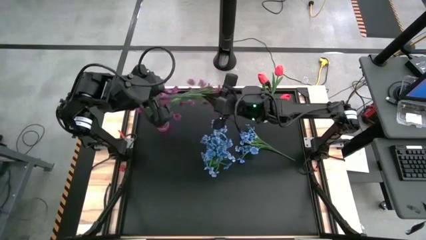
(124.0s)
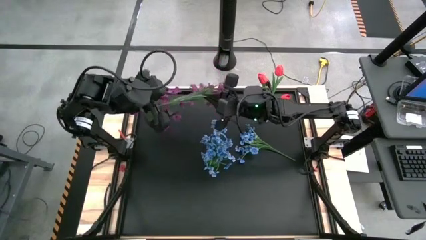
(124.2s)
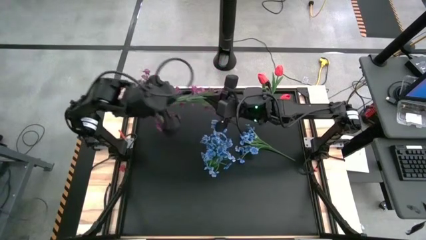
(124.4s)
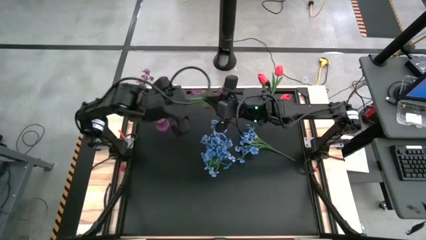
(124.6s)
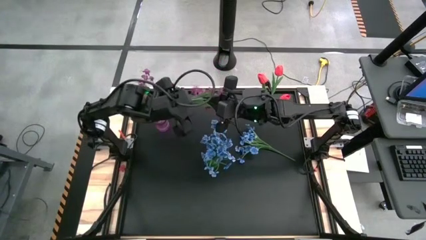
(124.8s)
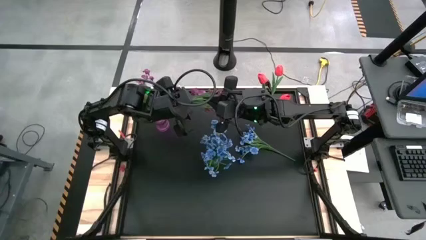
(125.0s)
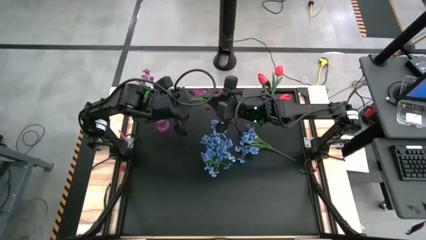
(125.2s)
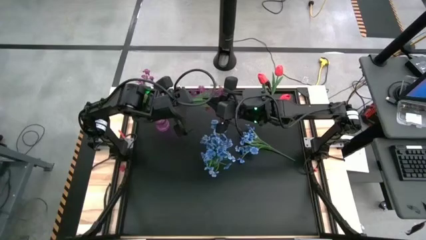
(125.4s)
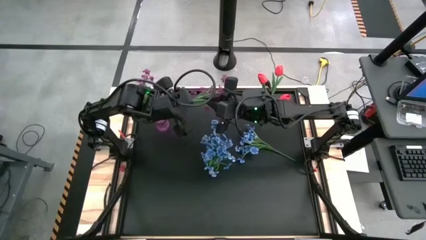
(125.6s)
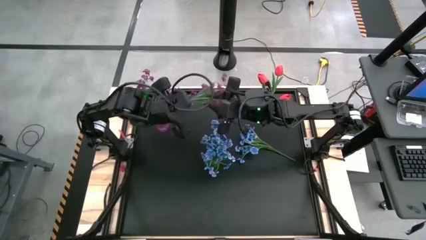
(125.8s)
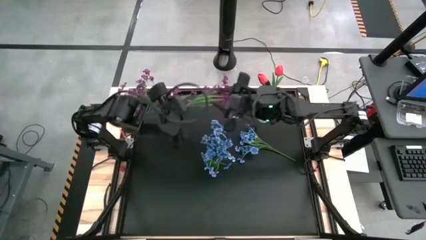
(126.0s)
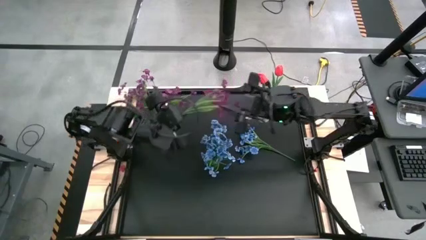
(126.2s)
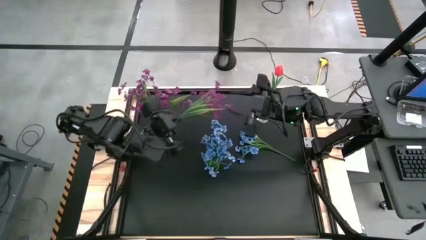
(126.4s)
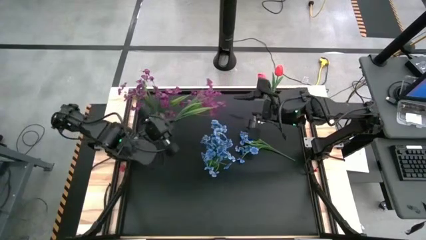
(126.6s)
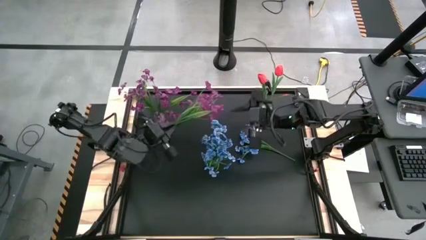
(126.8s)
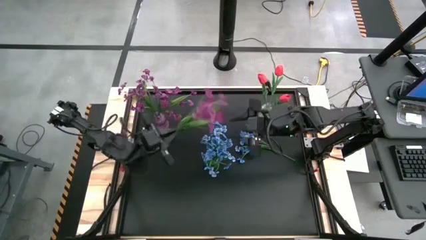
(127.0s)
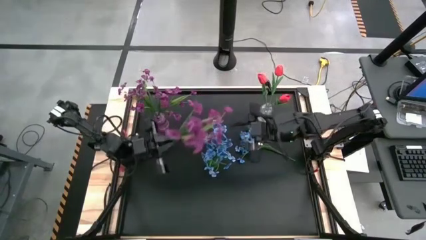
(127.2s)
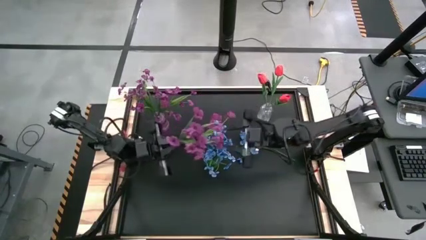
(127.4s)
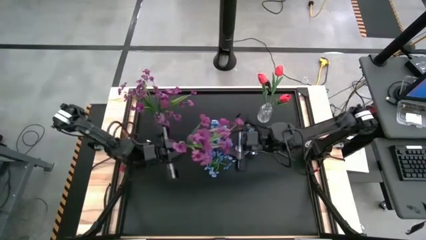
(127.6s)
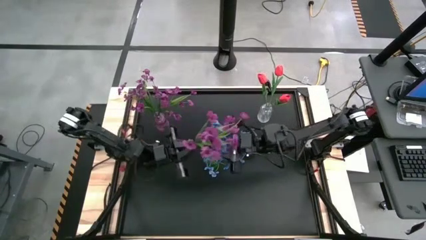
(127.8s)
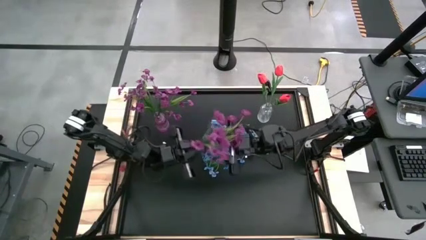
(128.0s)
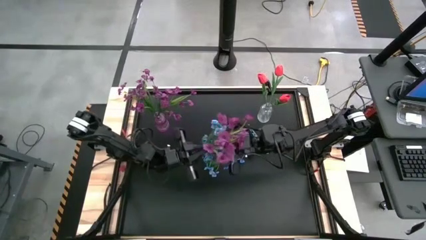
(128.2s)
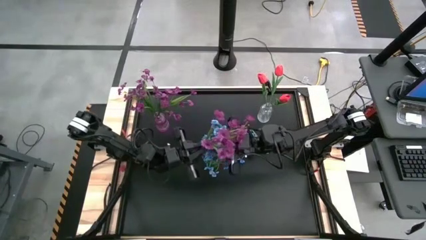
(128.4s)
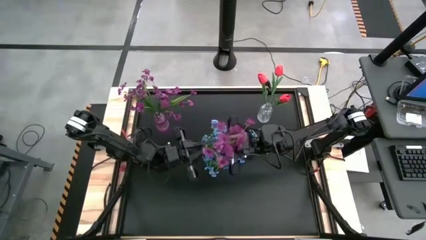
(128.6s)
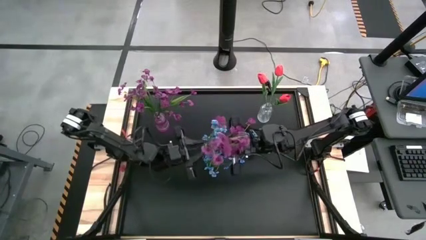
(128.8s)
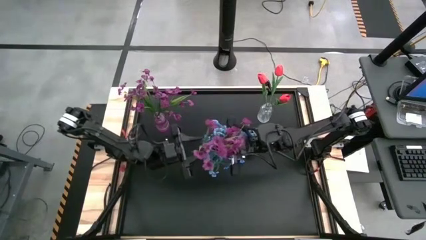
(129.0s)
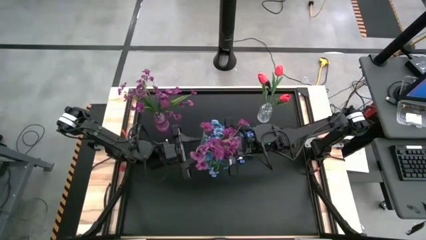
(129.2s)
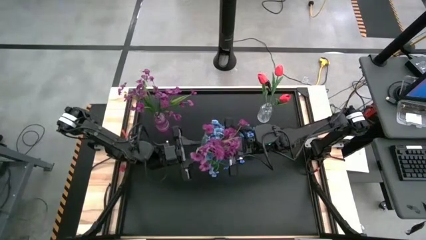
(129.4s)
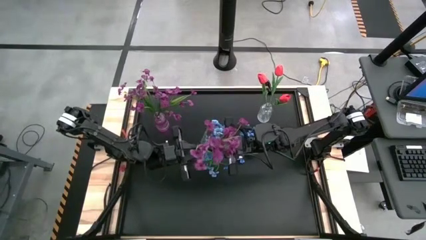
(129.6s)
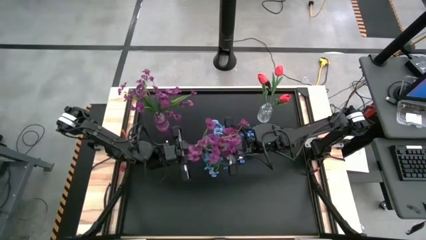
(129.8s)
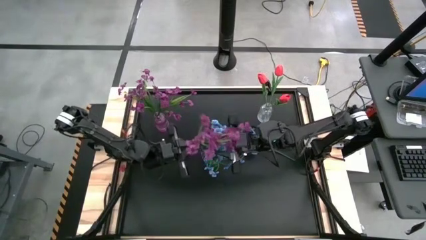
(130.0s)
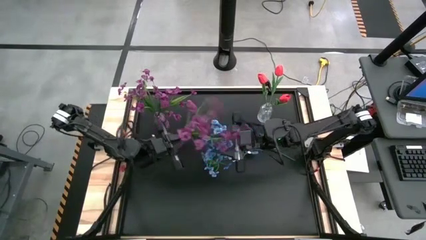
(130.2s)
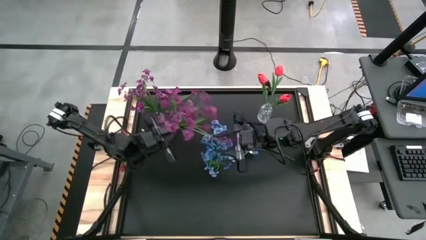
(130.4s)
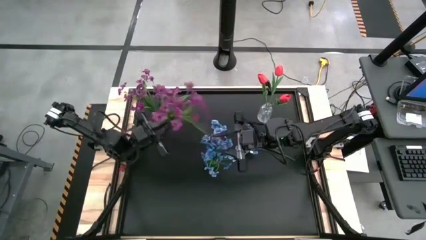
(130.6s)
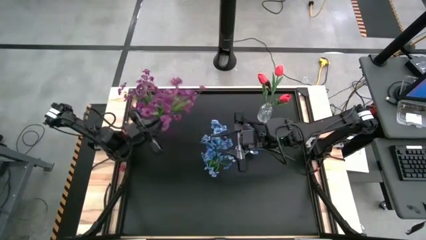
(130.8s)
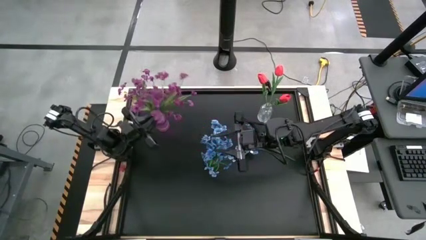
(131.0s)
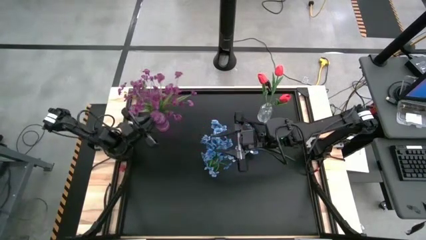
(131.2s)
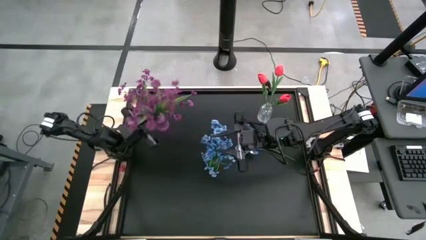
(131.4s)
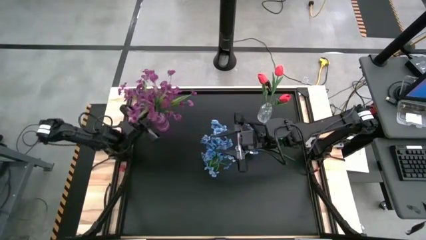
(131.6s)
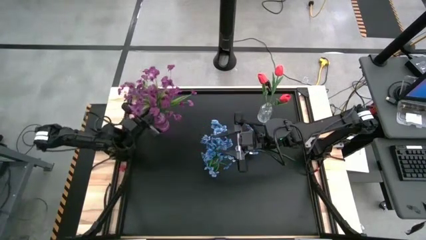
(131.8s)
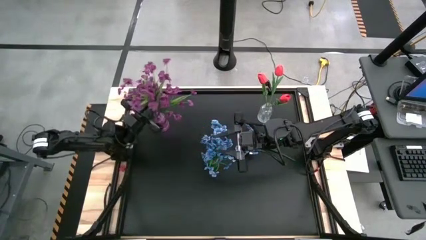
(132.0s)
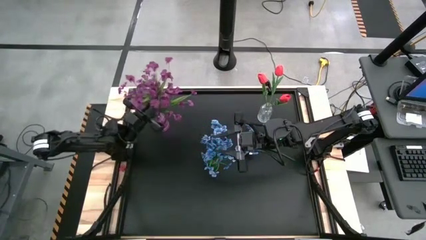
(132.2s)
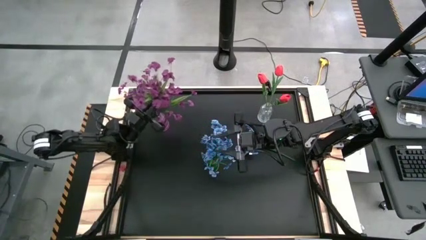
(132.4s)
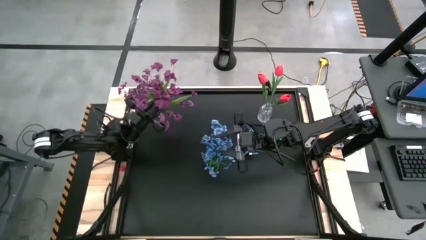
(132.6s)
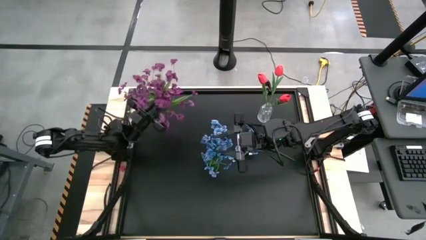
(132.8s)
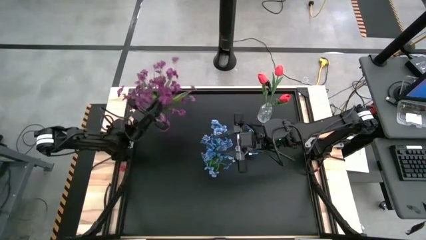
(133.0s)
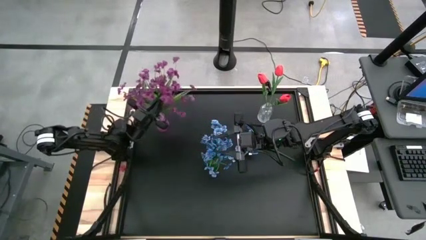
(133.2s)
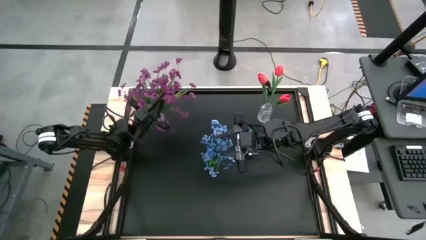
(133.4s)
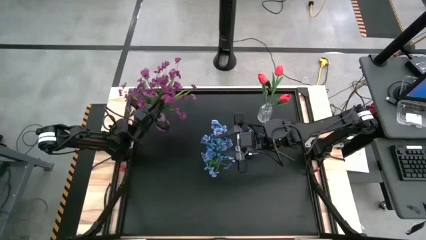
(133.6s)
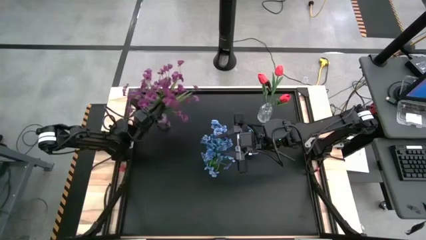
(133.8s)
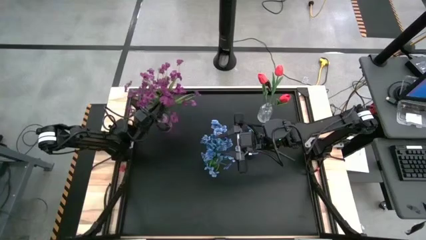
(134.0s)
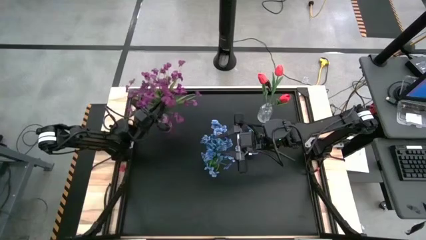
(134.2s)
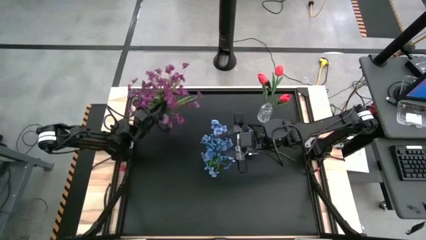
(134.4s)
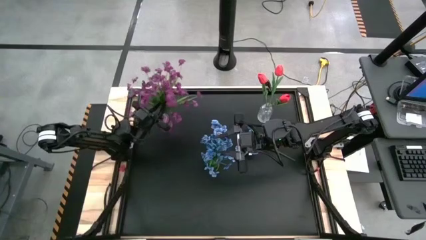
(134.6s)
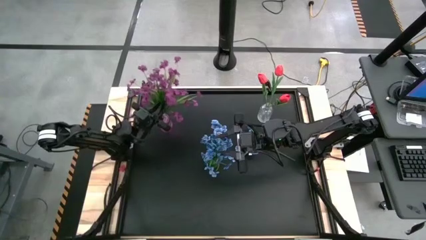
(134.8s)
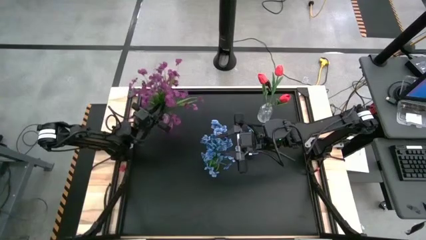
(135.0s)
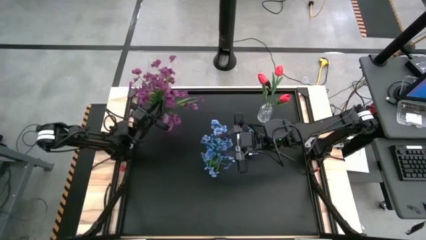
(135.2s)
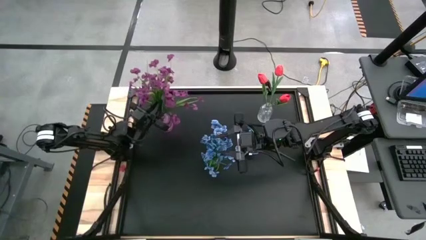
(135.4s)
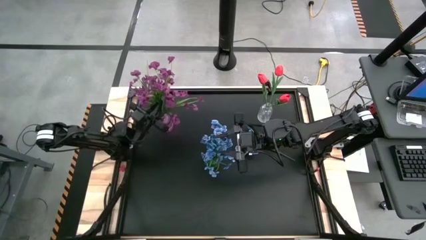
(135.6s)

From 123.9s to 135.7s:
Task: Sort flowers into vase by color
Put the purple flower into the purple crystal vase

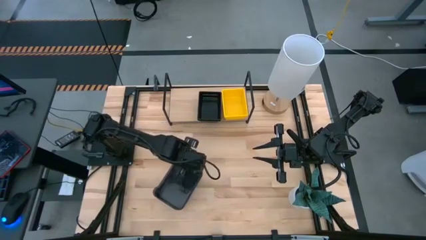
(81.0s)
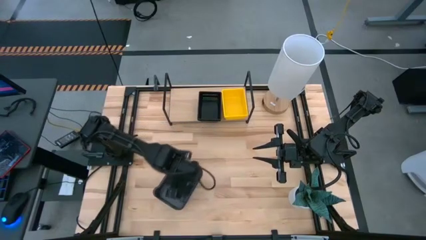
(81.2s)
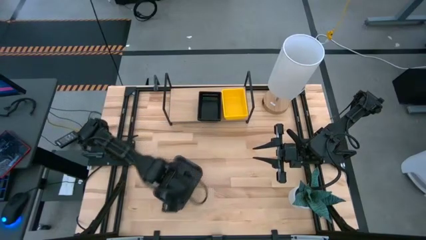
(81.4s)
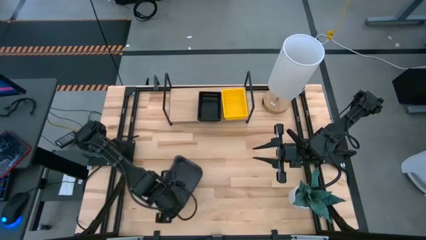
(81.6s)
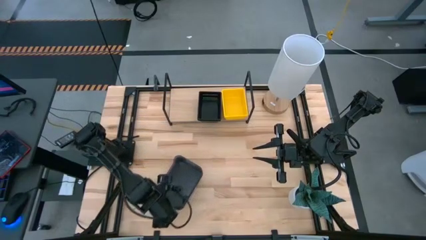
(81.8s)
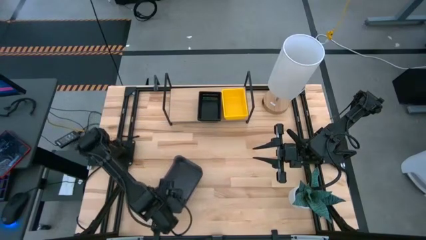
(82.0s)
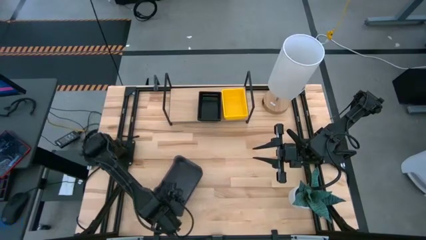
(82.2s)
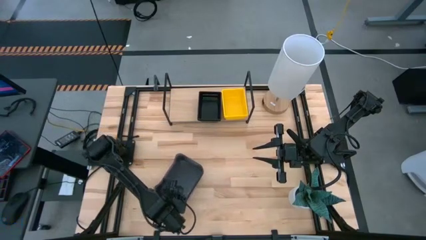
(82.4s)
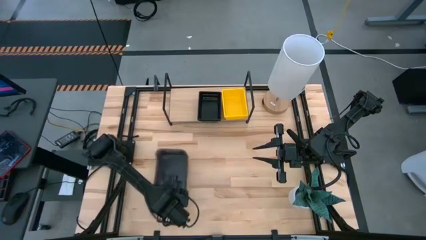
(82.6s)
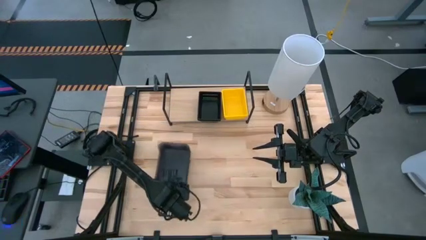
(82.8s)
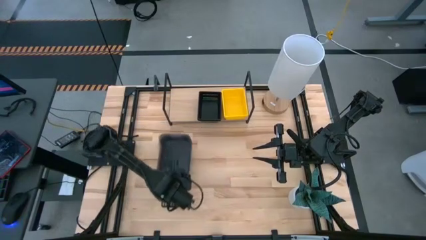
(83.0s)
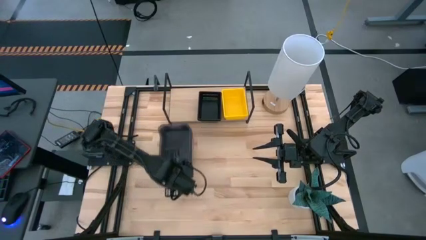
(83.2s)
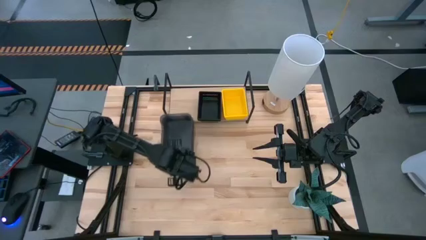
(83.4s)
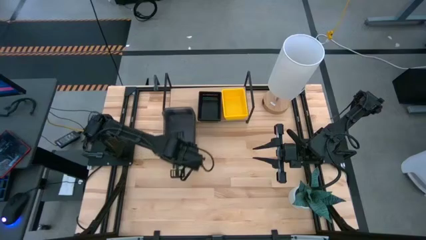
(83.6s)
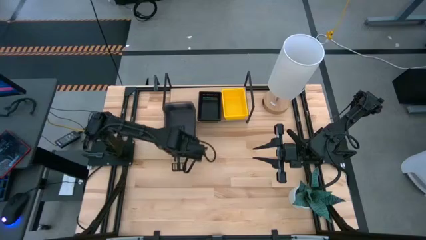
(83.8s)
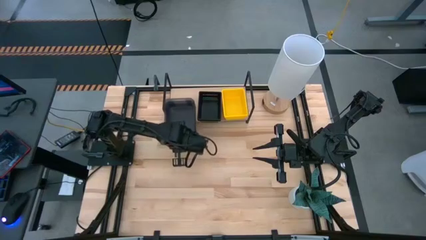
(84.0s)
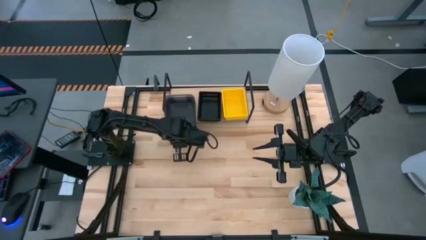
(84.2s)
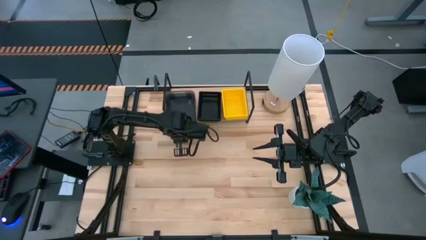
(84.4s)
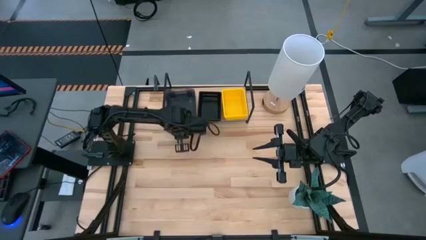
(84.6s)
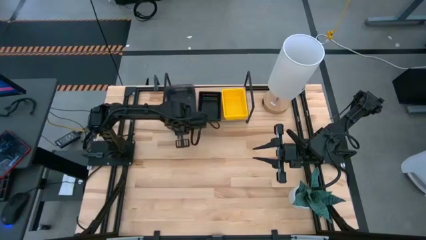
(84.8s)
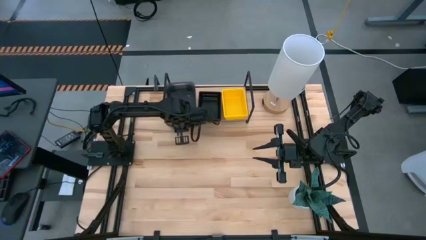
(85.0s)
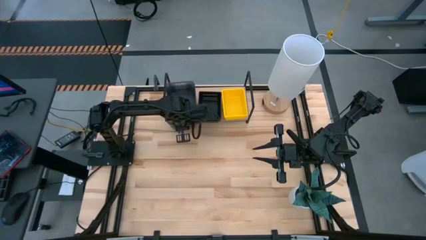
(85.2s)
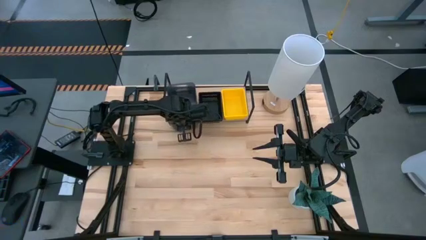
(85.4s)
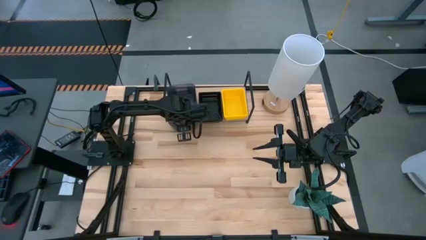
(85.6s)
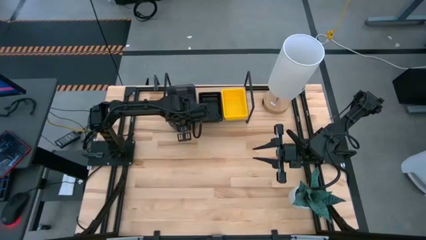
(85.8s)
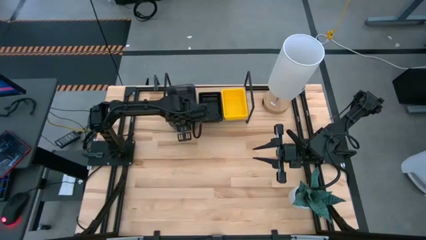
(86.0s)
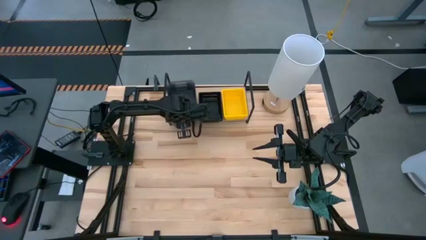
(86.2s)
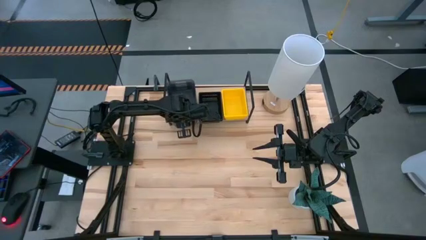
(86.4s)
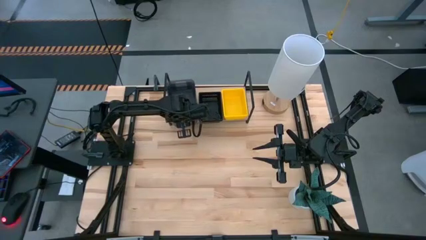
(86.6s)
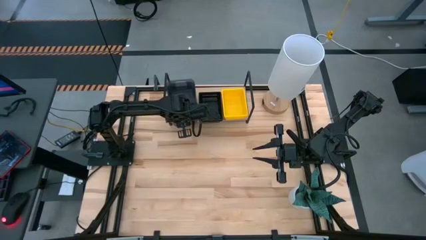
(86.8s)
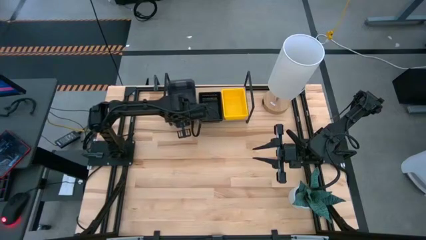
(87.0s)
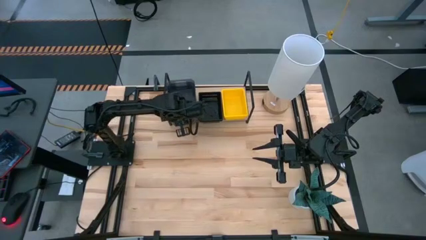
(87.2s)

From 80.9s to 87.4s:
Task: Stack baskets on shelf by color
Put the stacked gray bins on the shelf
